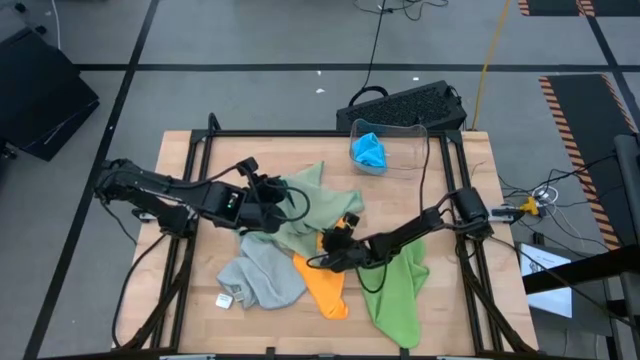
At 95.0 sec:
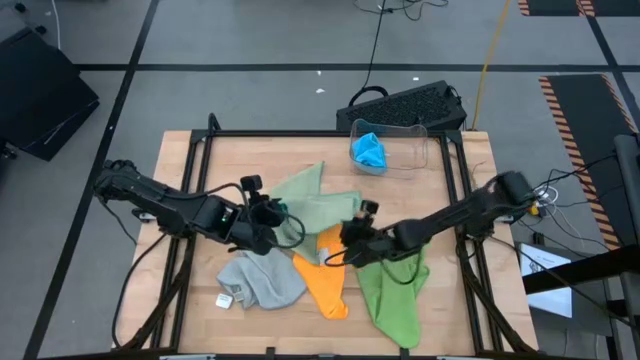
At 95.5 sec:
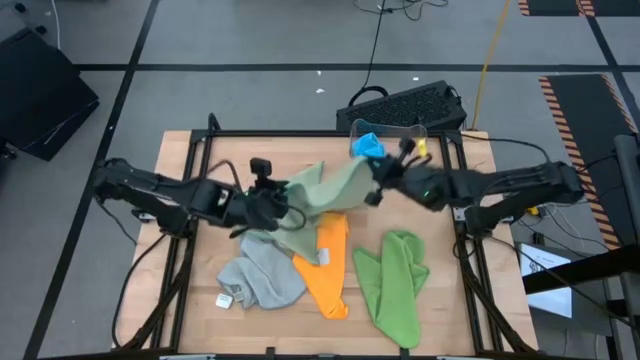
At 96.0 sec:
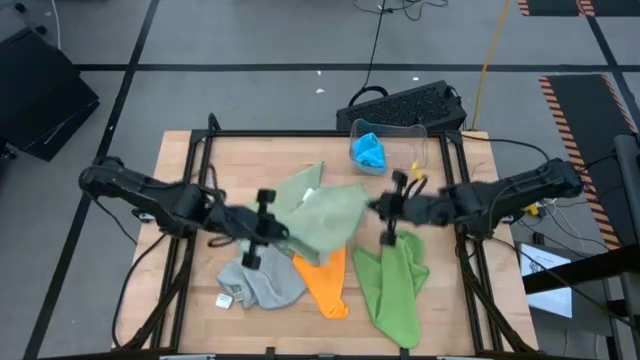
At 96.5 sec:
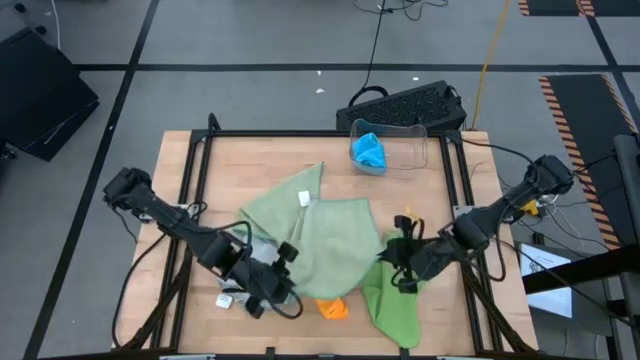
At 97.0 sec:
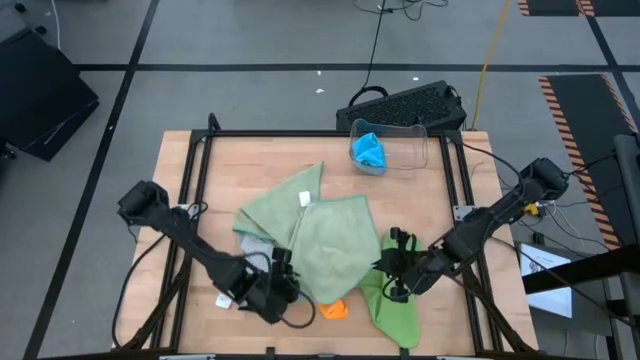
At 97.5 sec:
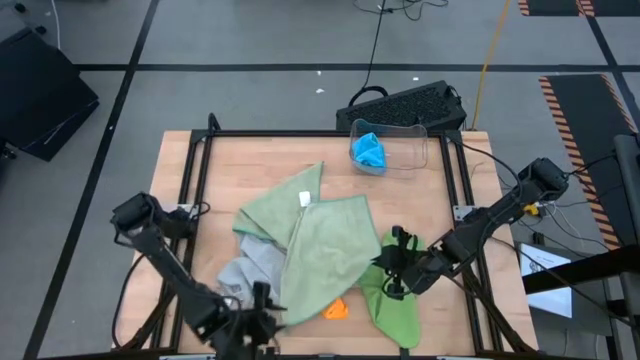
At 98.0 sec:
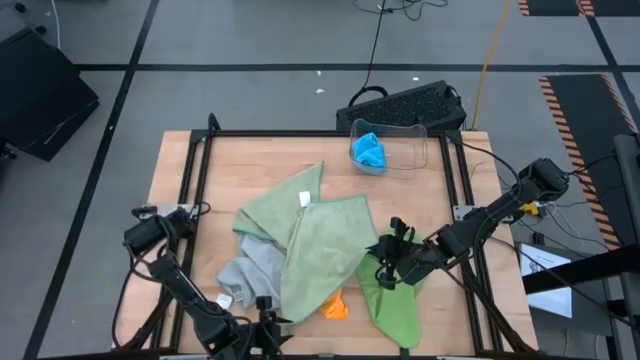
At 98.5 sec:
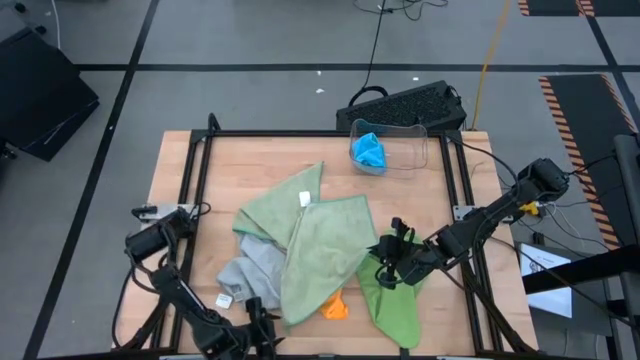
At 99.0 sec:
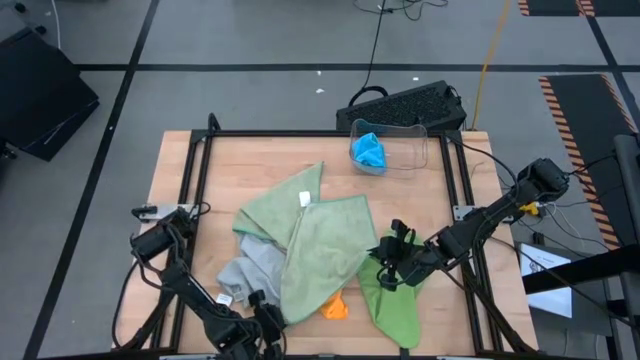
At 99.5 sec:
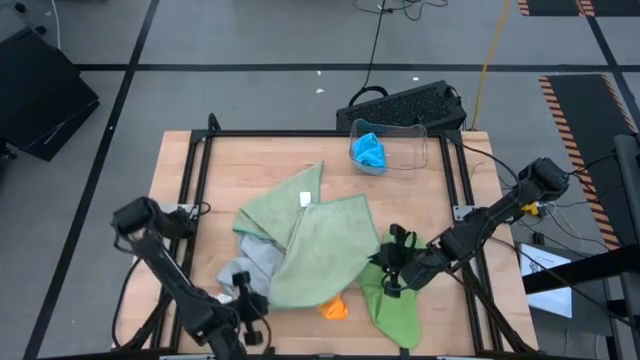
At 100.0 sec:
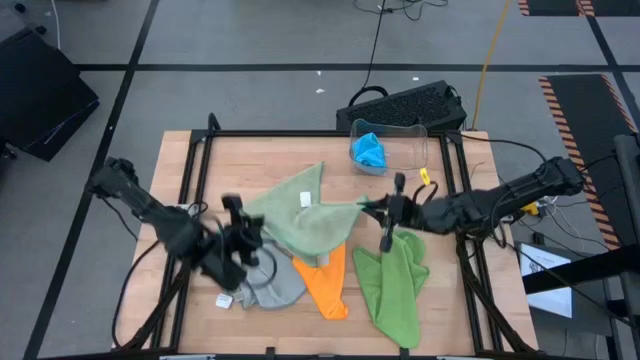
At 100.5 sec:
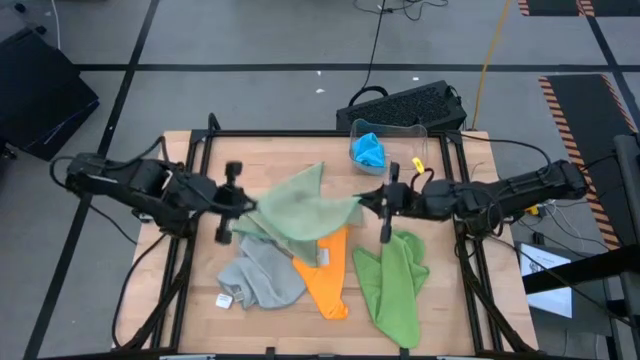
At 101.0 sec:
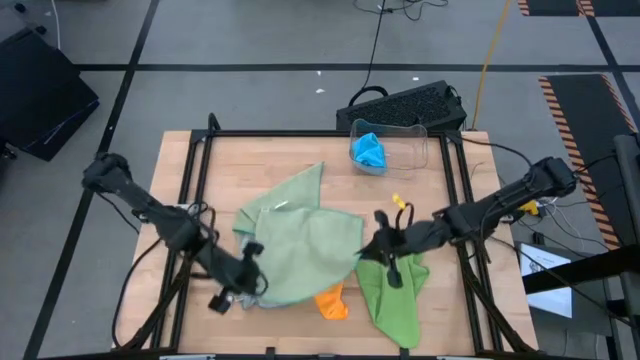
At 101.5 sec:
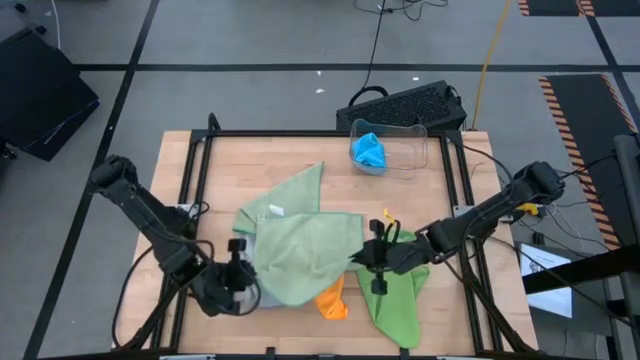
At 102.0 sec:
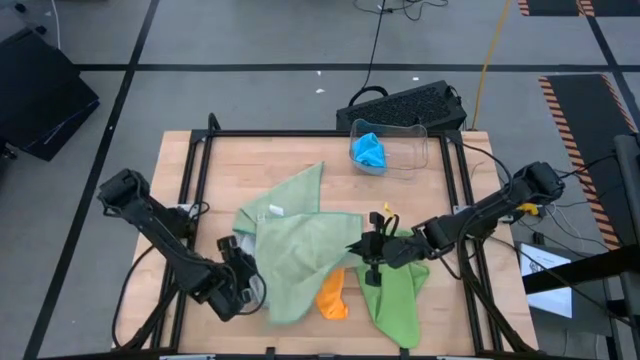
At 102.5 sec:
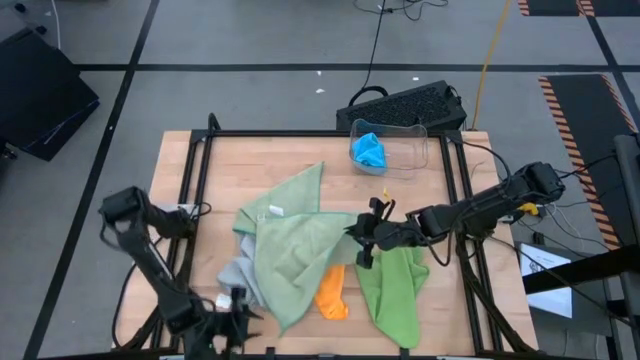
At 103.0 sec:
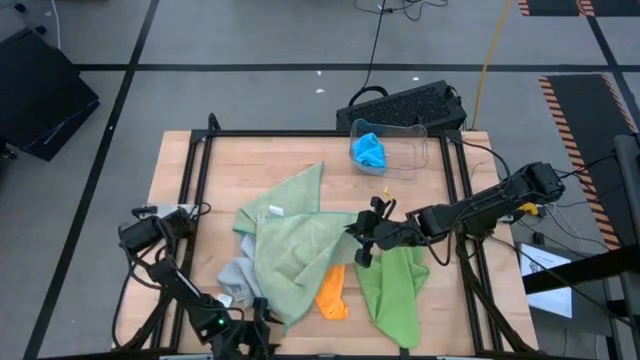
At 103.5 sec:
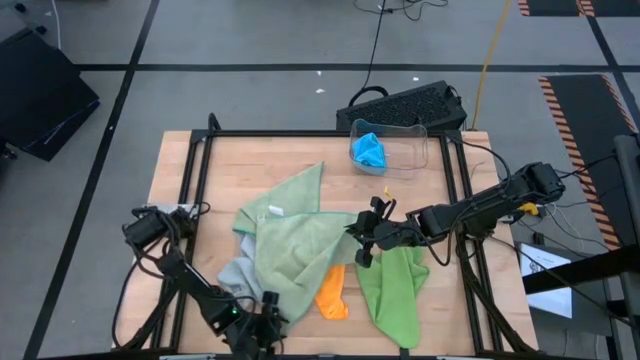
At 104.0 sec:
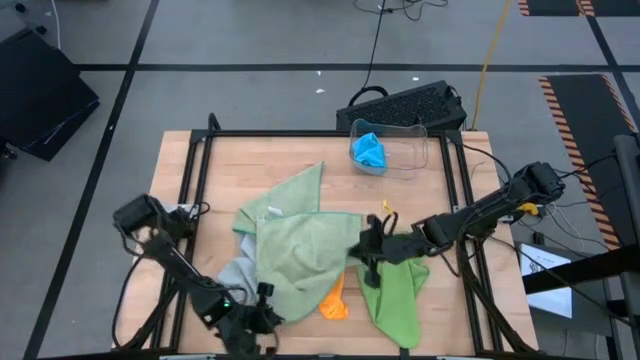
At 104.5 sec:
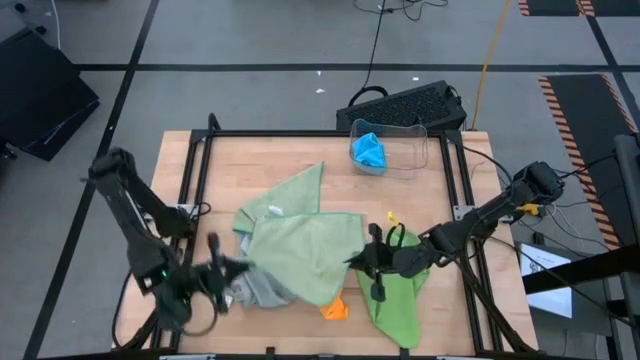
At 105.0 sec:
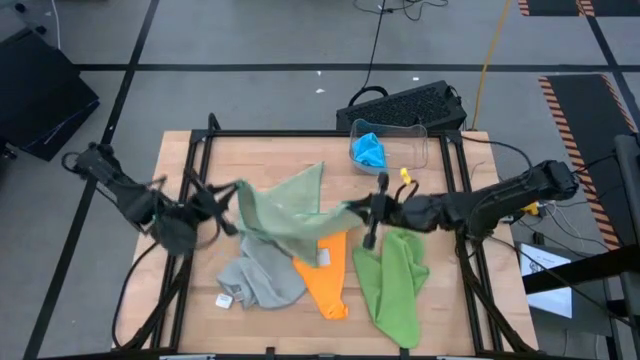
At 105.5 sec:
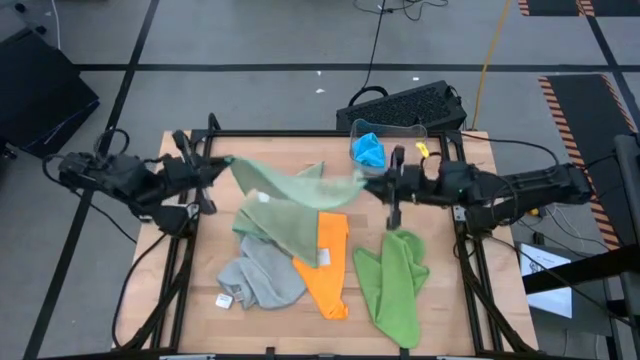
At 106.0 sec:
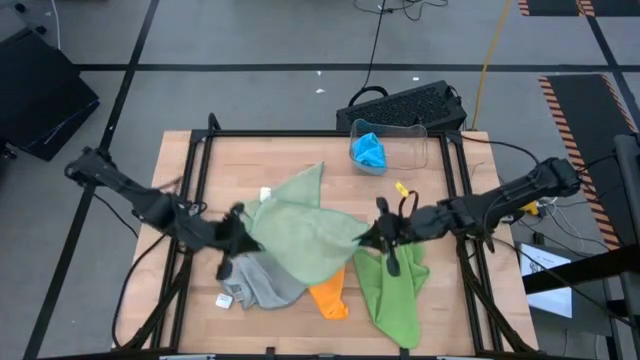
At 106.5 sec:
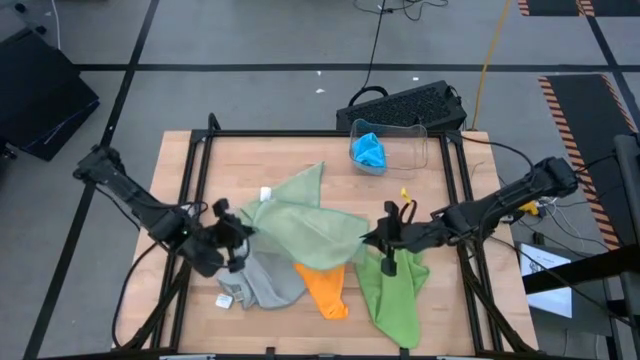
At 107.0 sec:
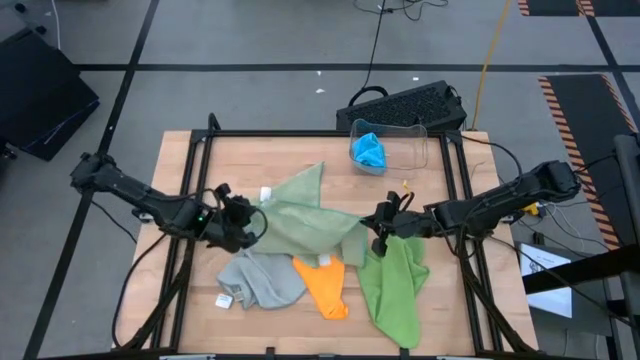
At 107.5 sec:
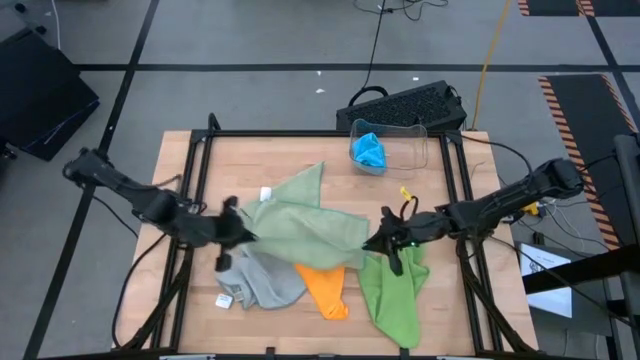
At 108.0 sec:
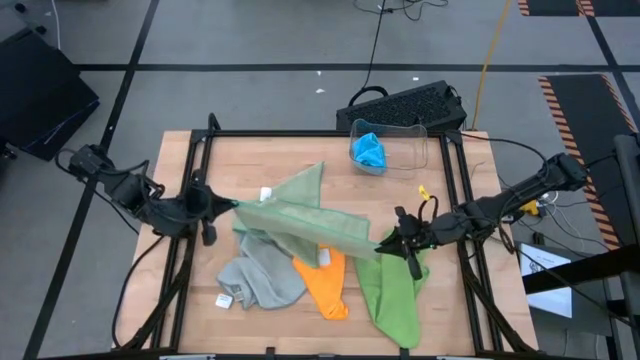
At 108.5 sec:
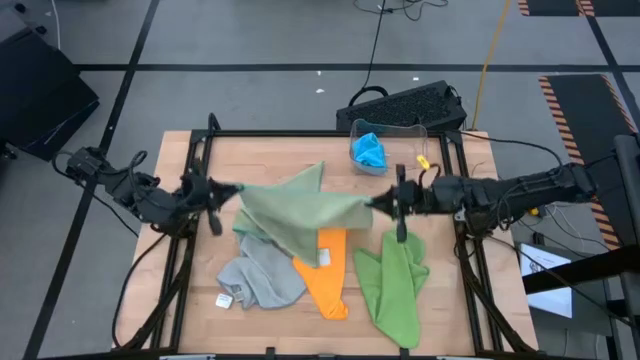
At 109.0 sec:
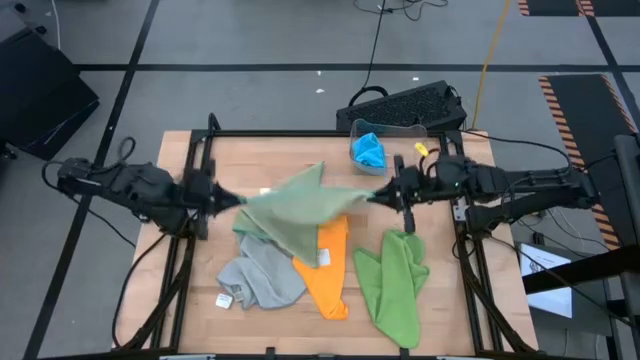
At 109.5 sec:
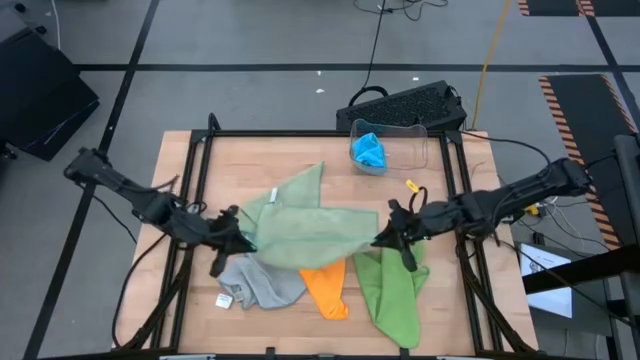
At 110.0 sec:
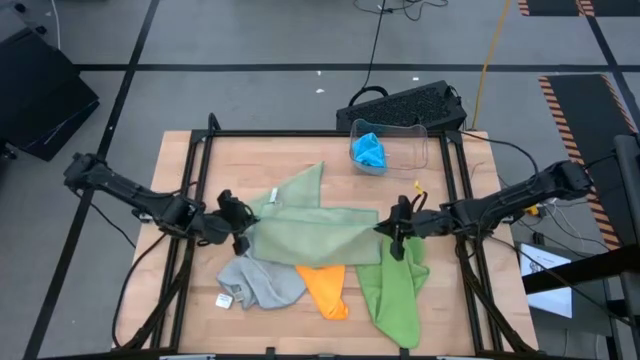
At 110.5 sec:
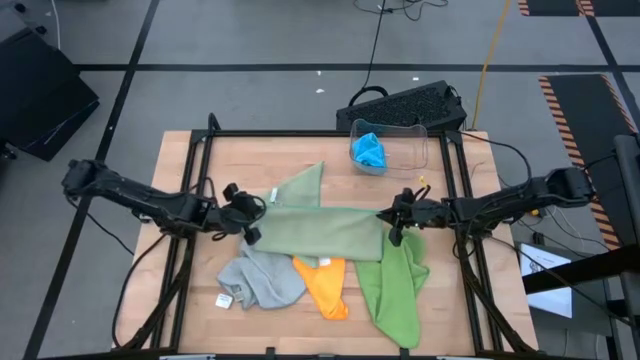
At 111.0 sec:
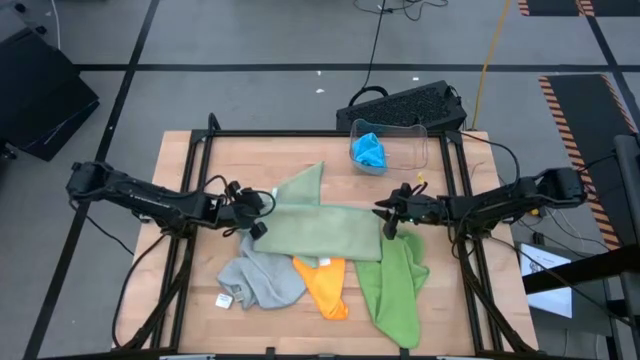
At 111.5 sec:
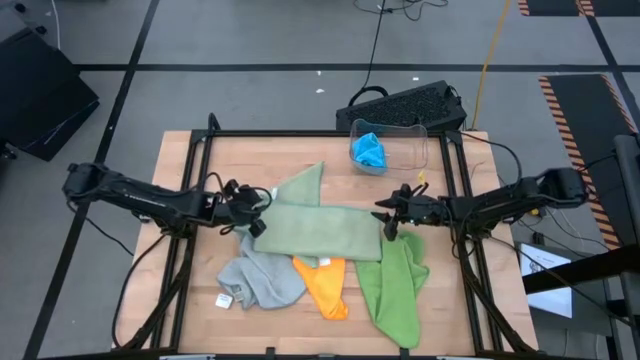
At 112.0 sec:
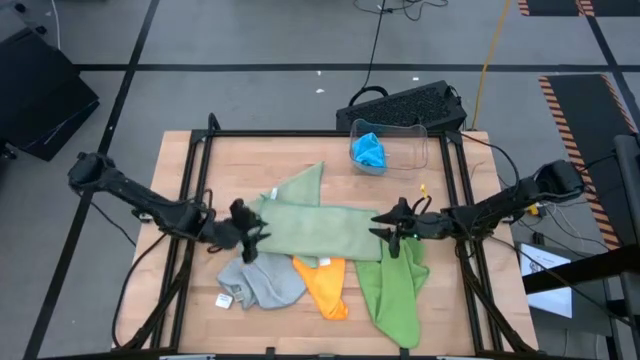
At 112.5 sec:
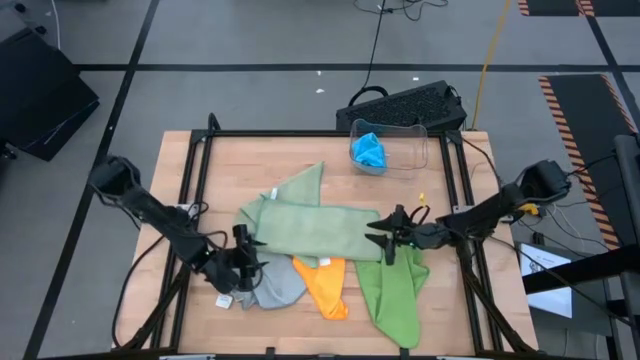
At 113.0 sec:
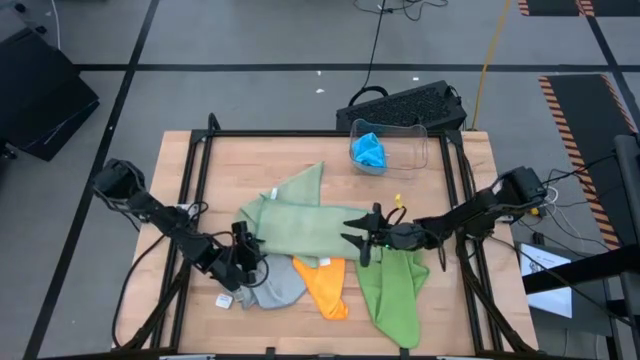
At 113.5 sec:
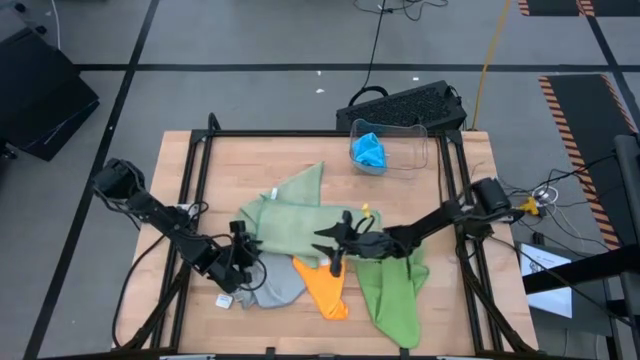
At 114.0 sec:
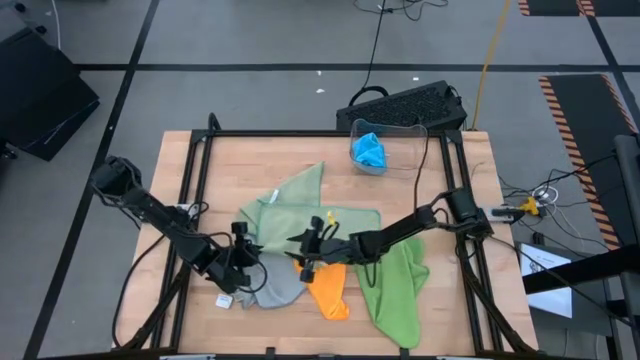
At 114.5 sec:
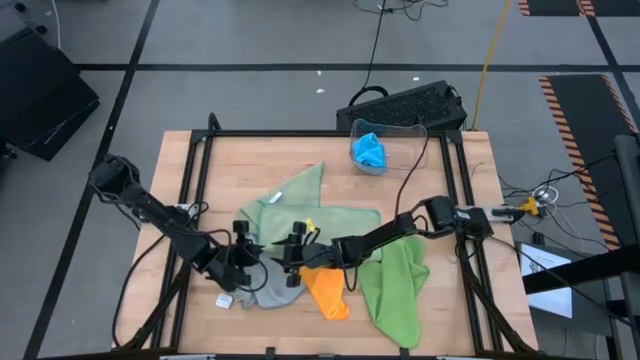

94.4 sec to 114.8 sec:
Task: Fold microfiber towels
Fold the right light green microfiber towel
